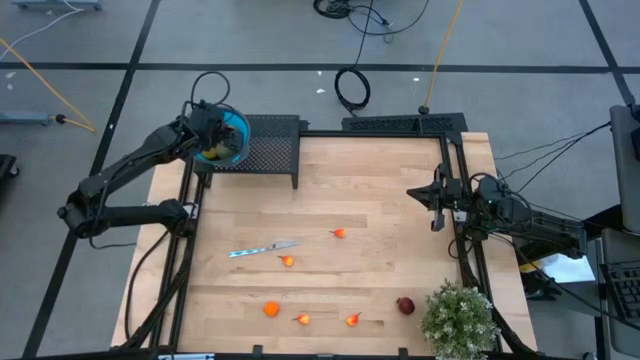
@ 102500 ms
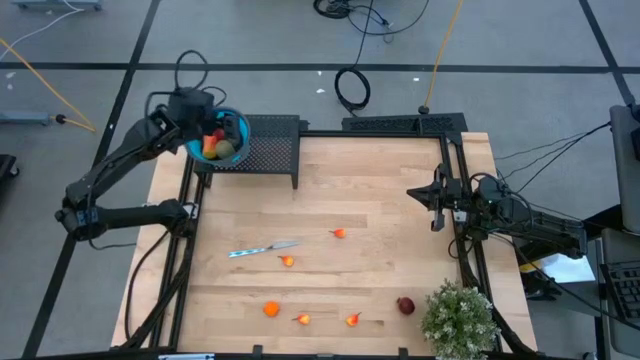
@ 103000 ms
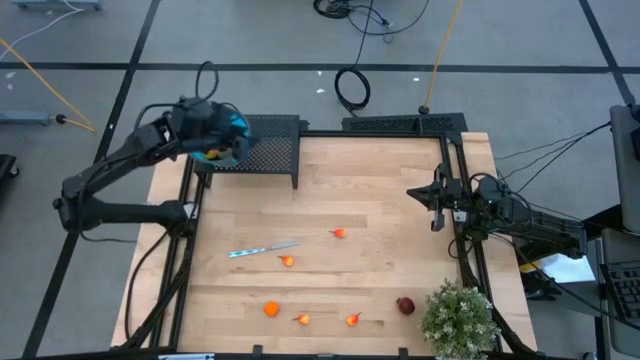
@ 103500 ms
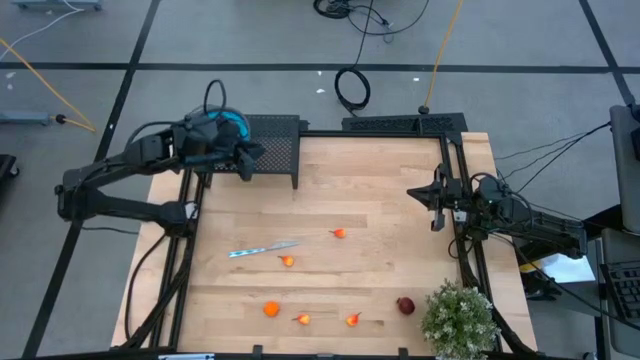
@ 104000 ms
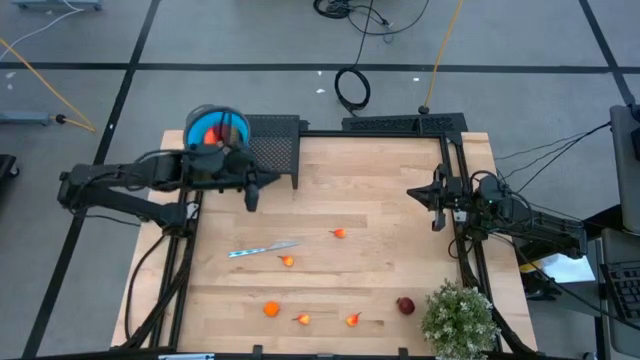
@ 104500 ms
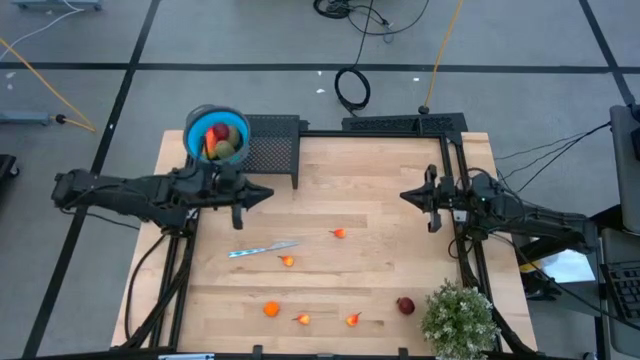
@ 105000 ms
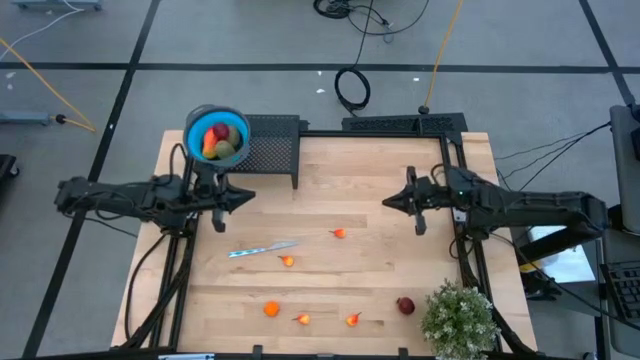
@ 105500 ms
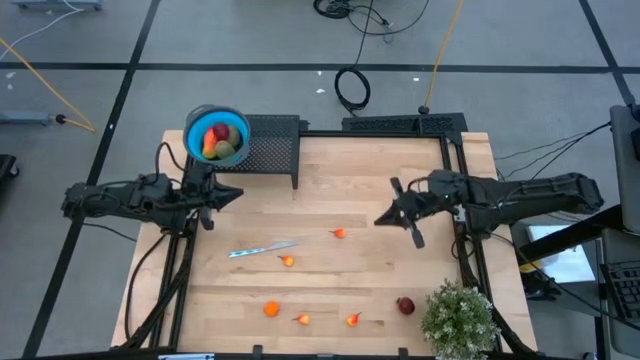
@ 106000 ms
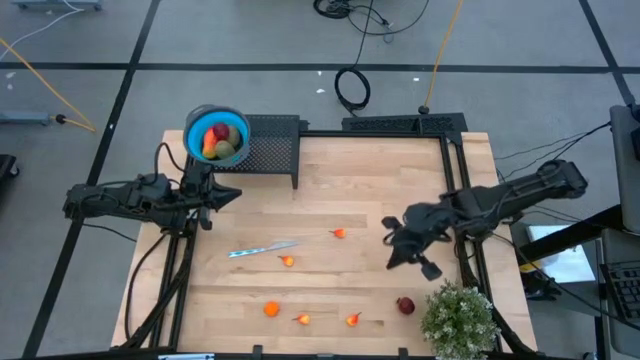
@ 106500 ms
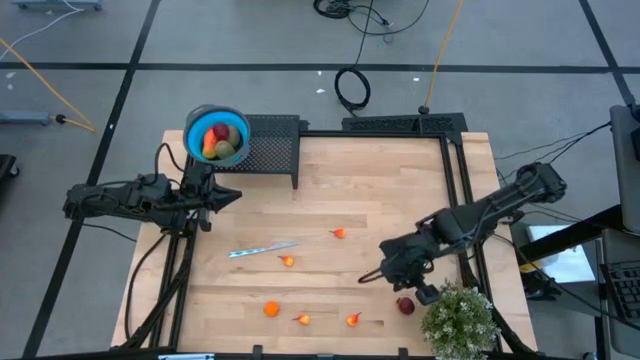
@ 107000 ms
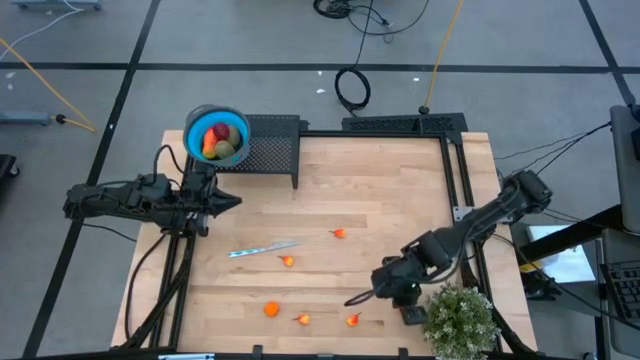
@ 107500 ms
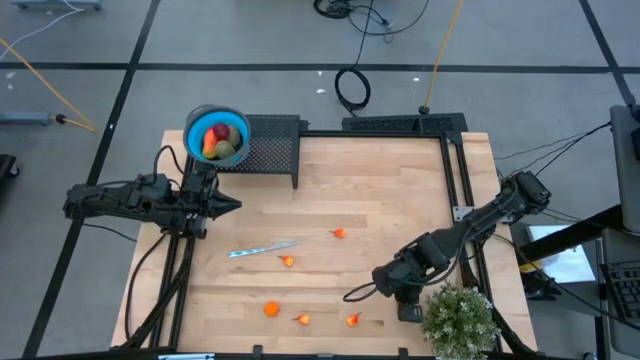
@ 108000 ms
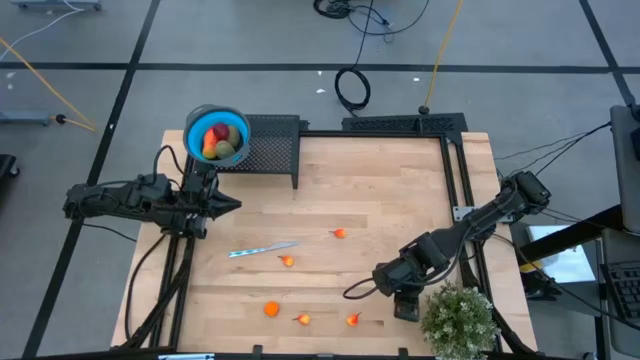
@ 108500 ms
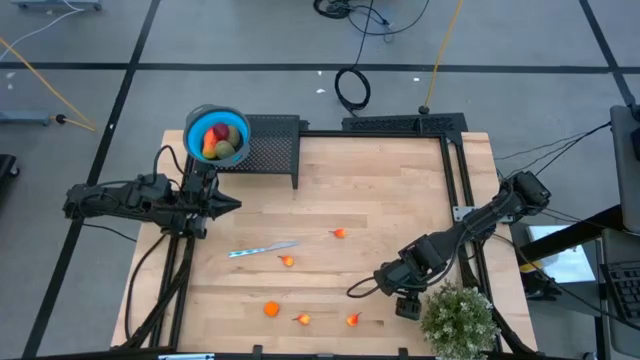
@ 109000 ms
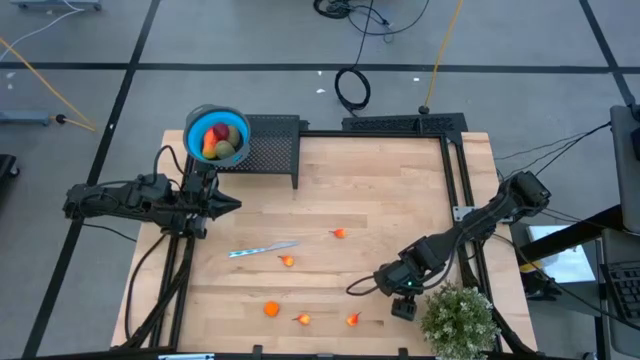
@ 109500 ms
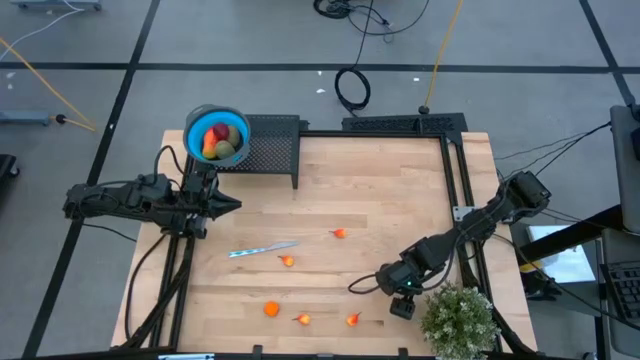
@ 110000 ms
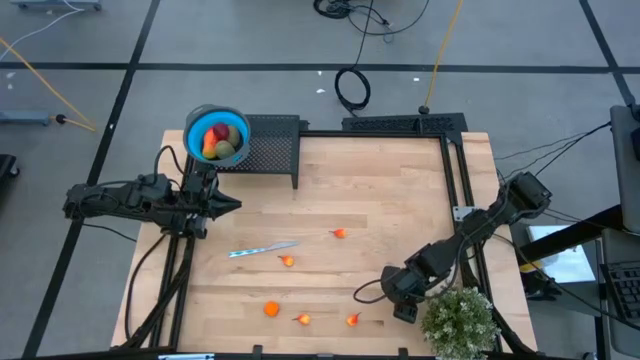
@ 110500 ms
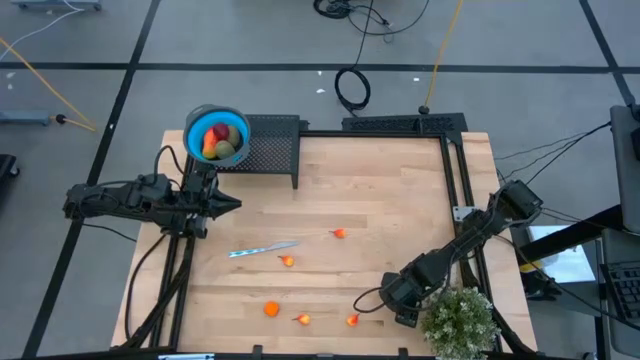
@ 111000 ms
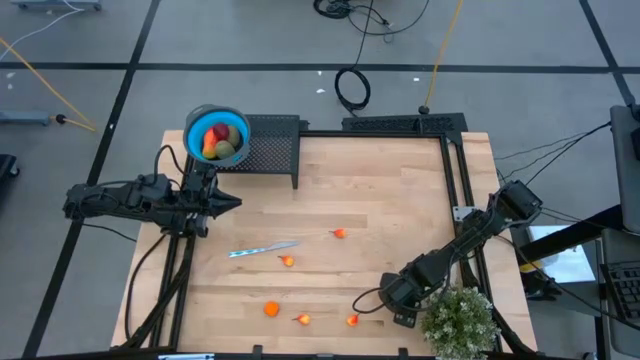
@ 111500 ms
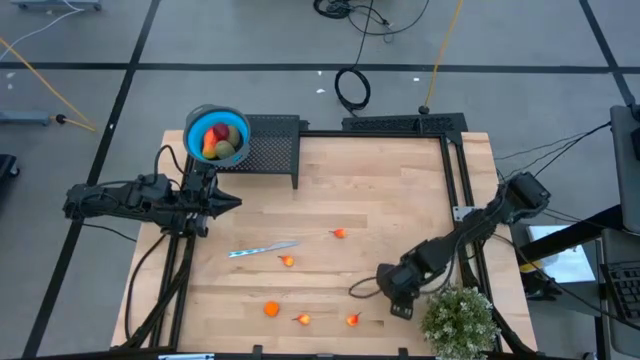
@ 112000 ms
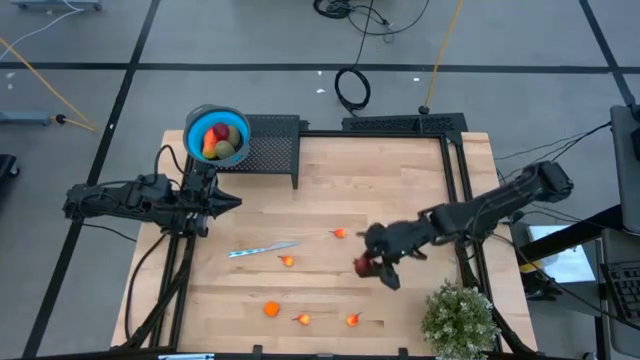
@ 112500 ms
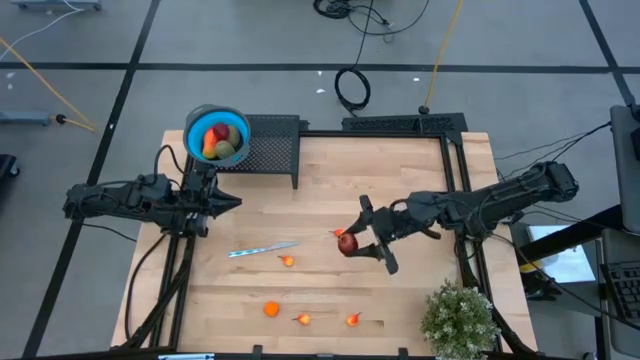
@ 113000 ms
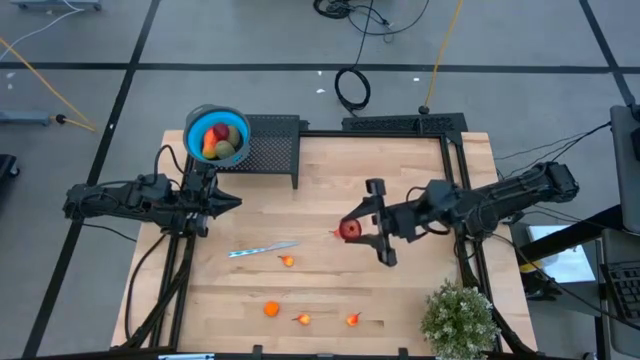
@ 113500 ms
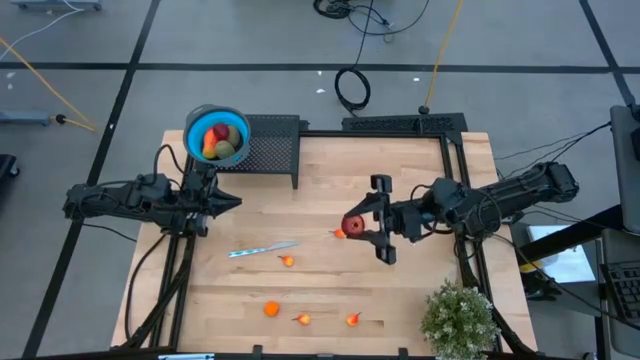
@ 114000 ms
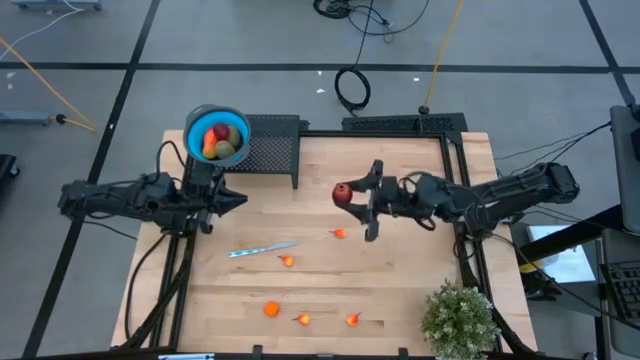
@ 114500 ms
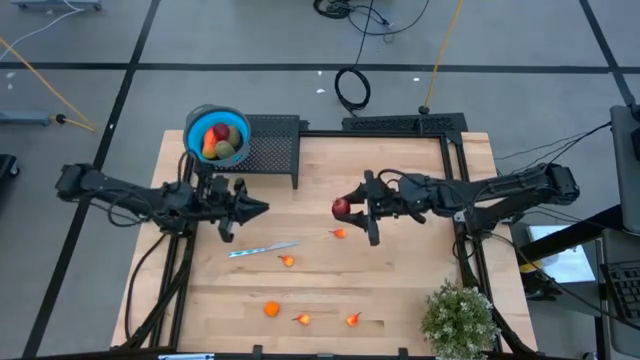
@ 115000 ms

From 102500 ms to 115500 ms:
Task: Pick & Place Fruit
Put the pomegranate into the blue strainer bowl on the shelf

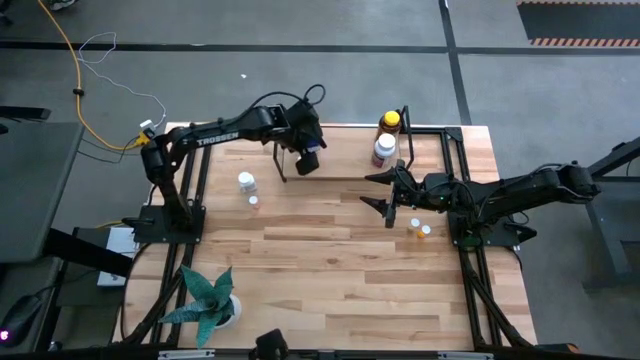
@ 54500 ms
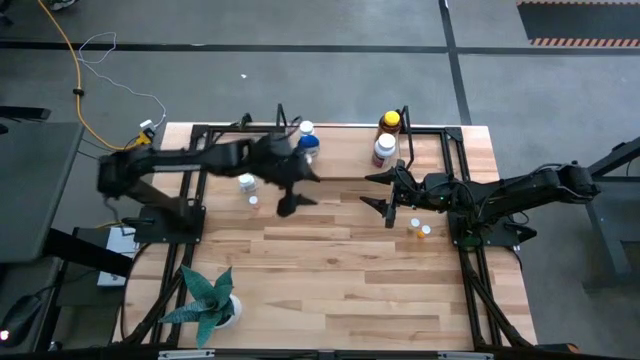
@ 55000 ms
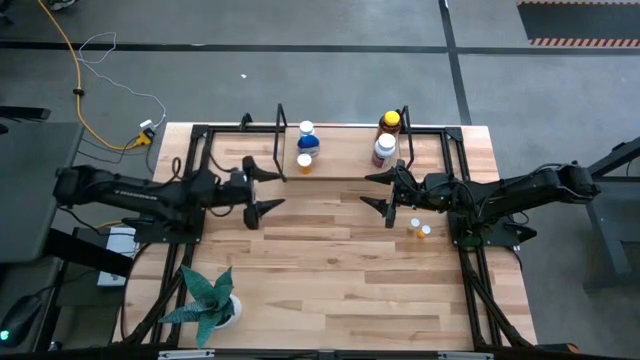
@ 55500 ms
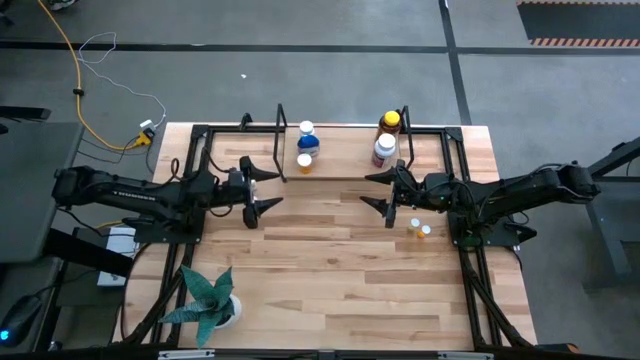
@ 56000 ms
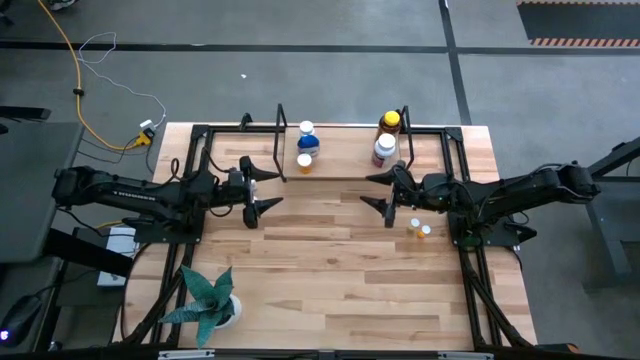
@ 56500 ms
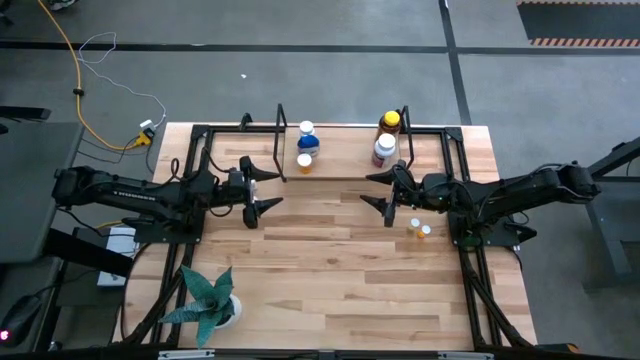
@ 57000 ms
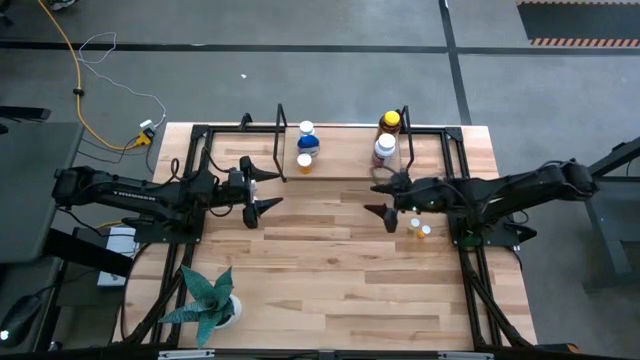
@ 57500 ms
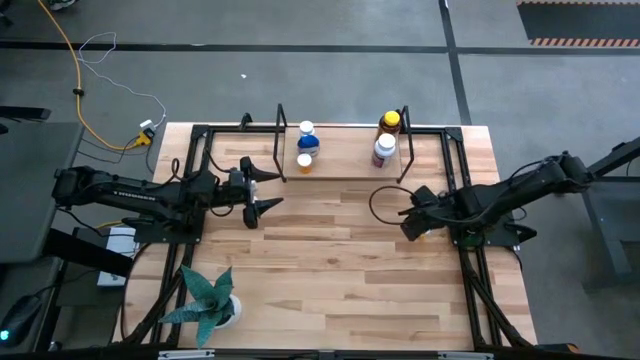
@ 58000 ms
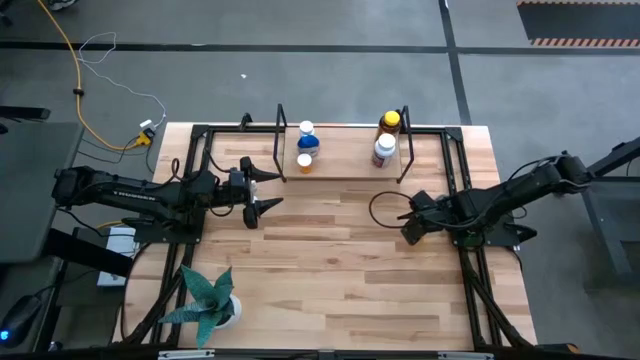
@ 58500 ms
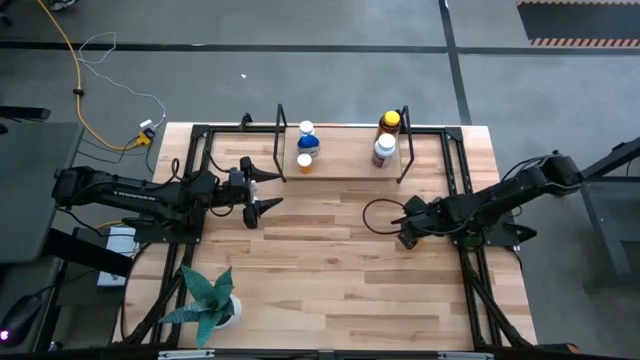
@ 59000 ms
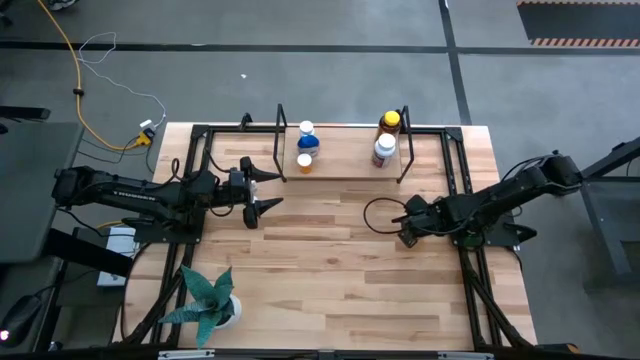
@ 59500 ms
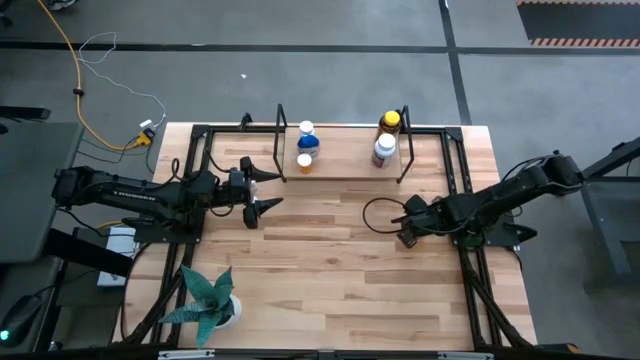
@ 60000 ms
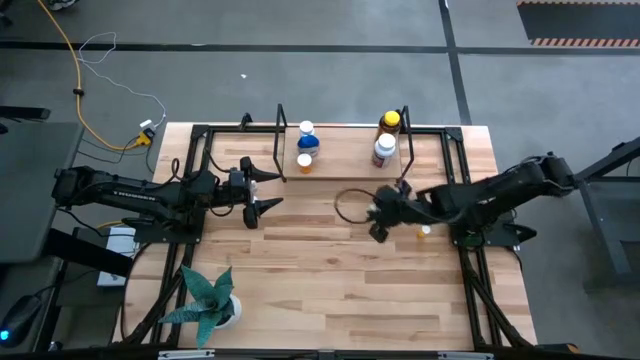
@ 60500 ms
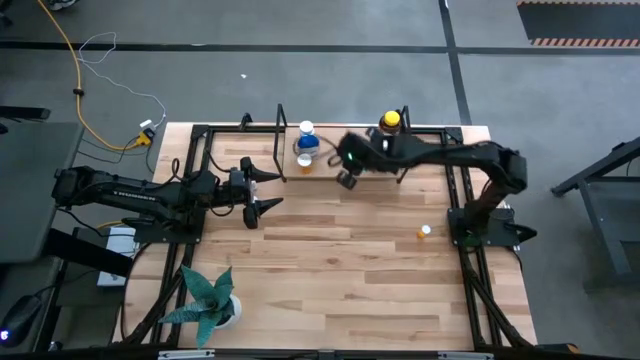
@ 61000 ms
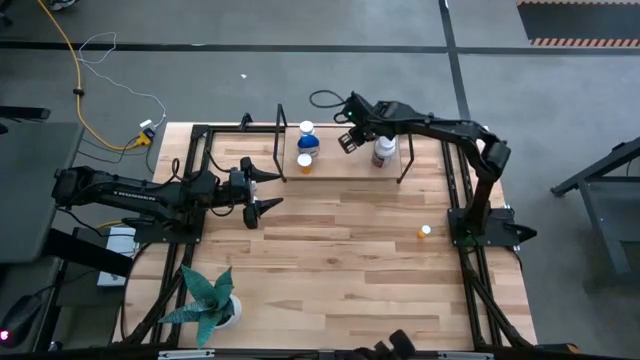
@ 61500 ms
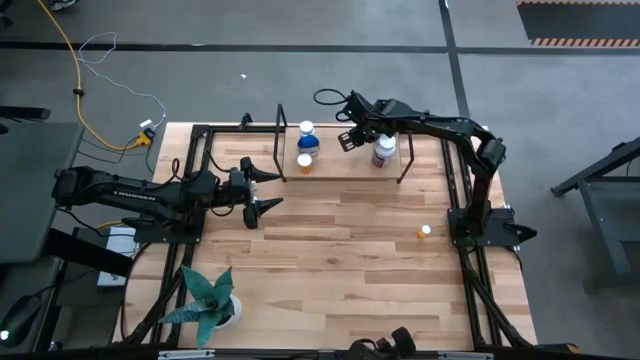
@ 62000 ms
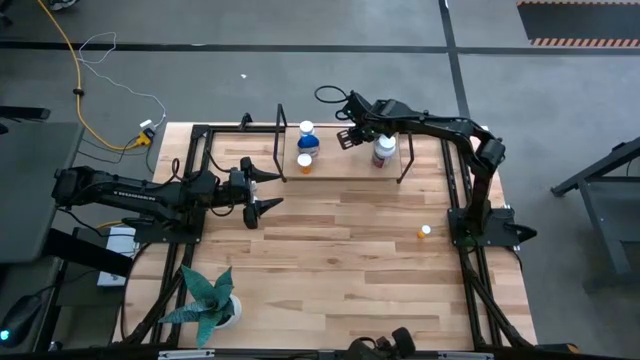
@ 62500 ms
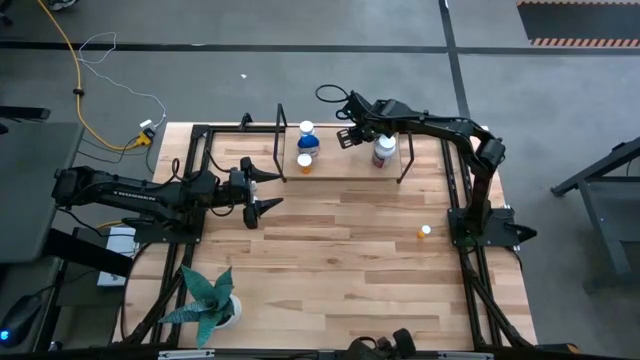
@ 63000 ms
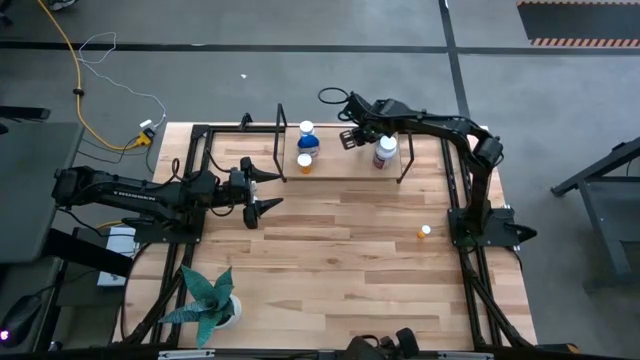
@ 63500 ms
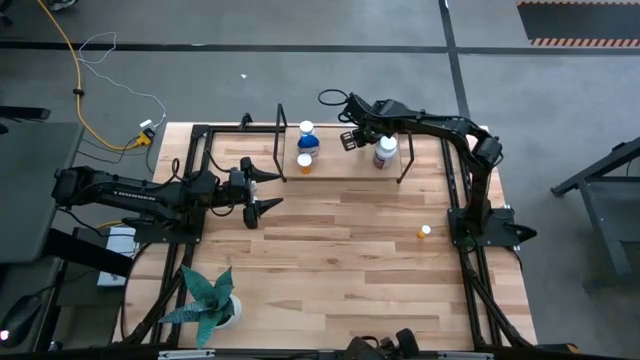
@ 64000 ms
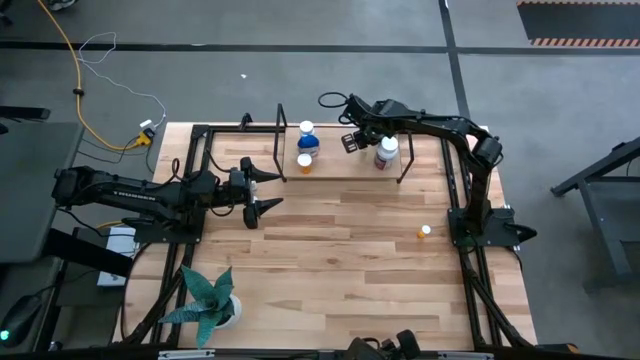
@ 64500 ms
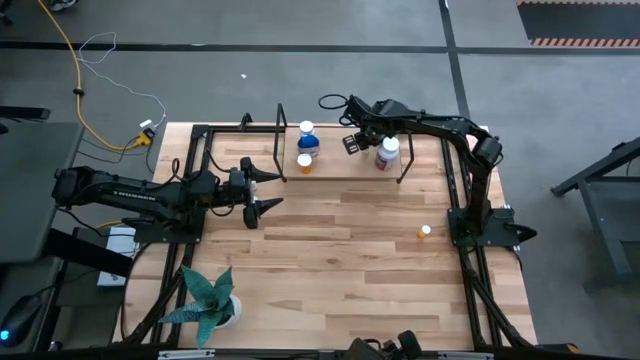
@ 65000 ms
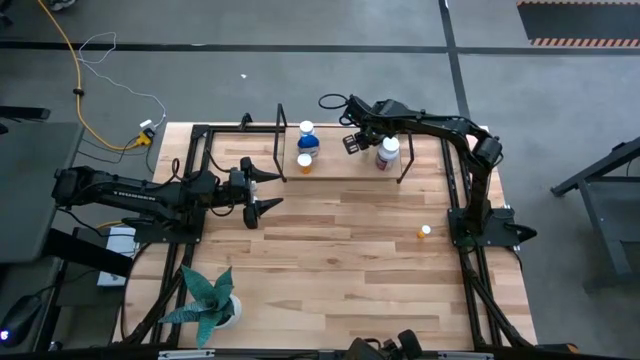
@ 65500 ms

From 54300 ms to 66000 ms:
Task: Pick and place medicine bottles onto shelf by color
Put the small light yellow pill bottle on the shelf
